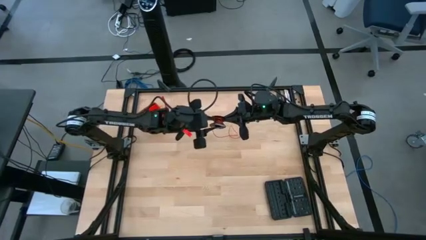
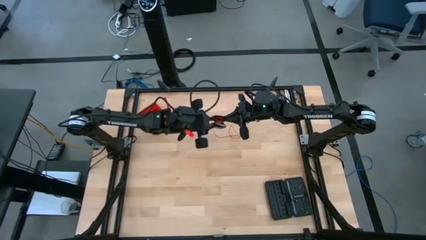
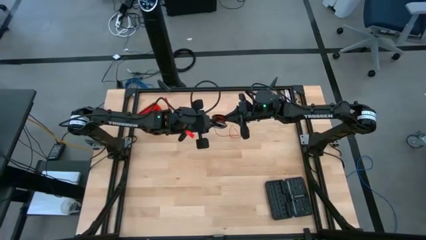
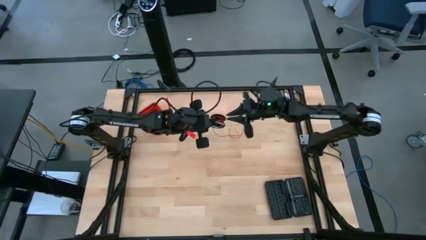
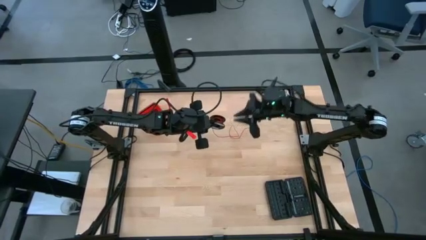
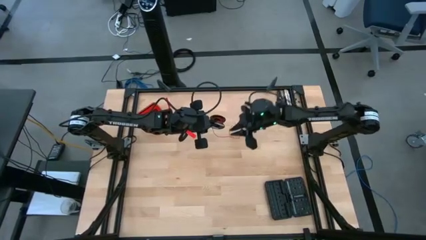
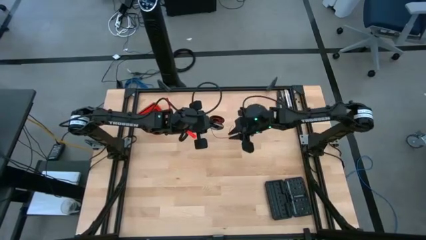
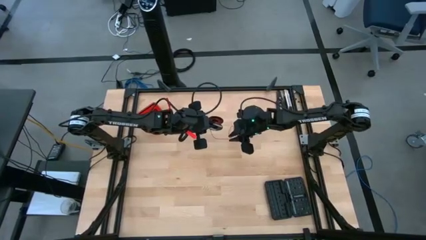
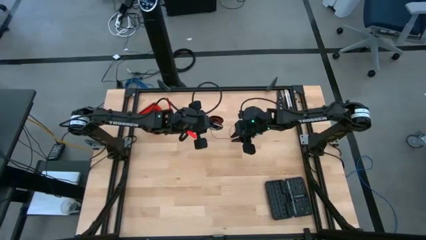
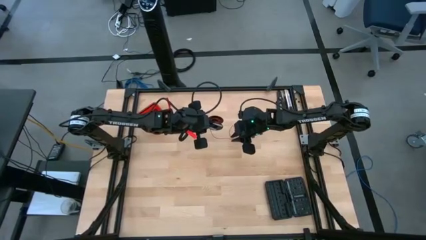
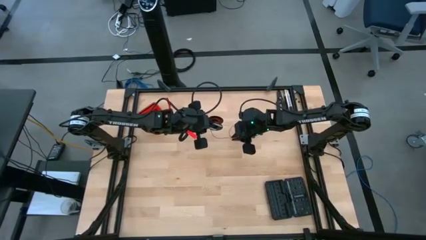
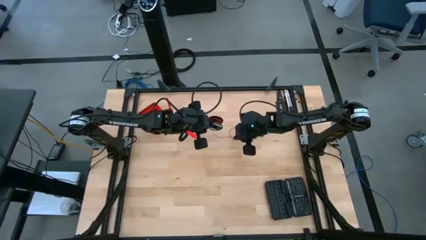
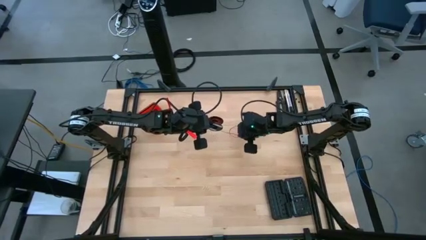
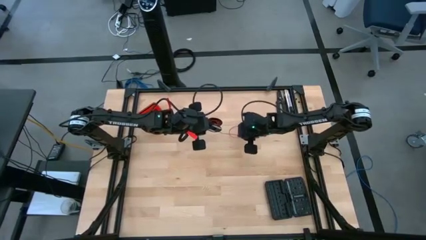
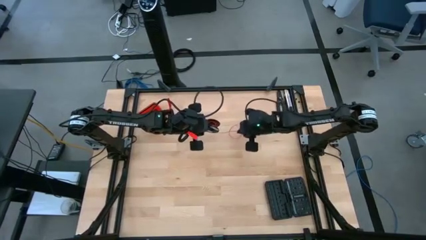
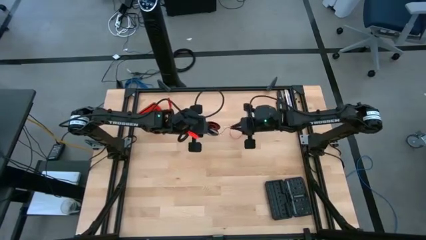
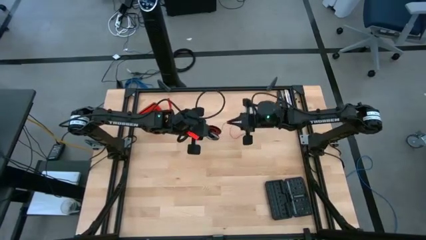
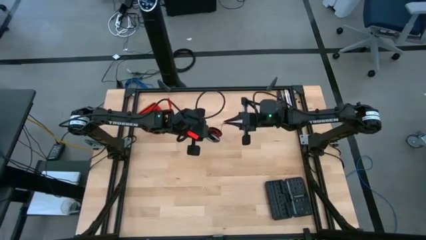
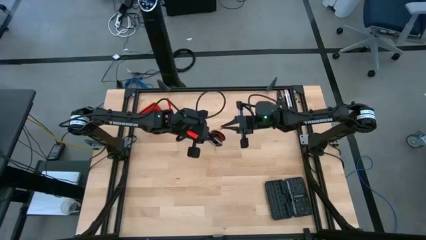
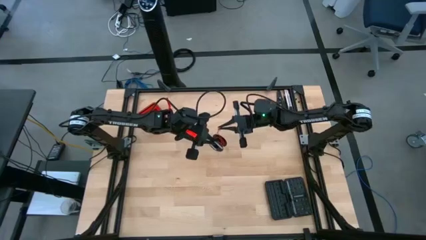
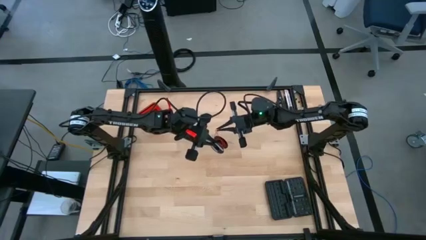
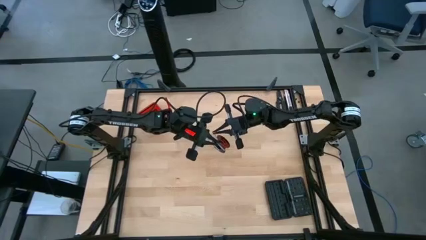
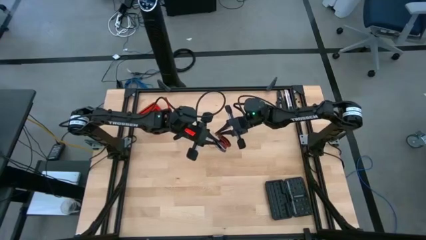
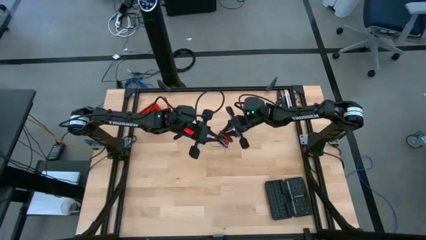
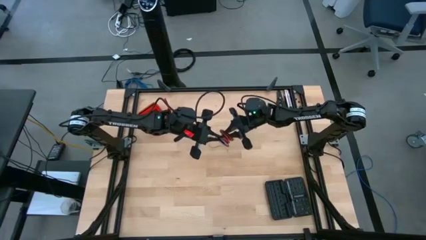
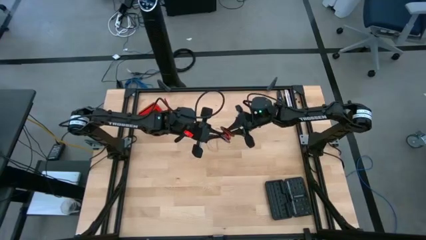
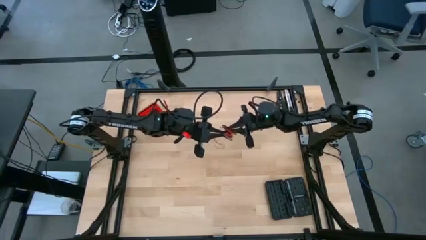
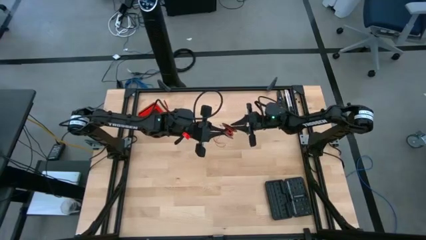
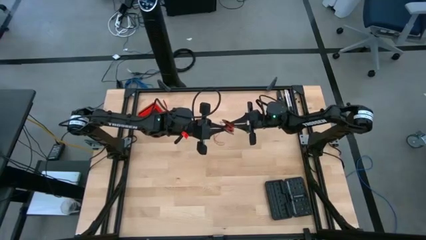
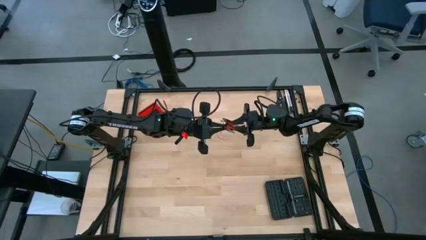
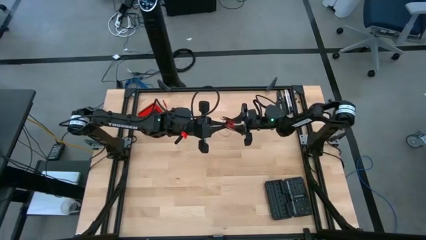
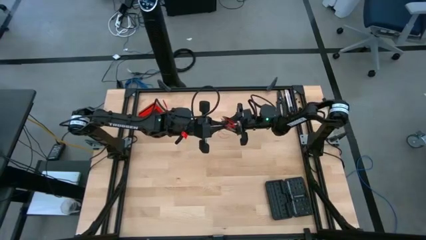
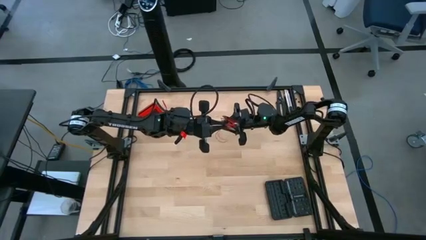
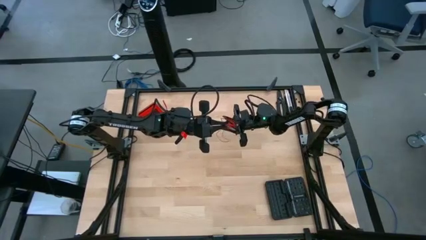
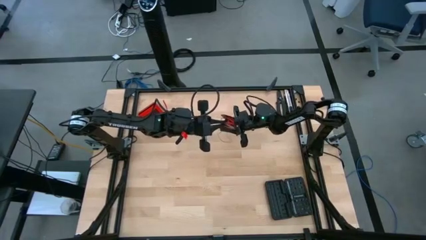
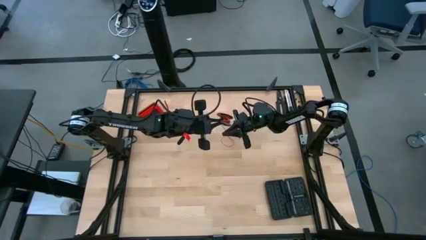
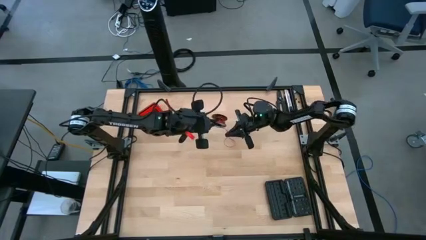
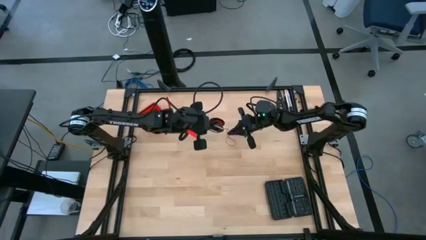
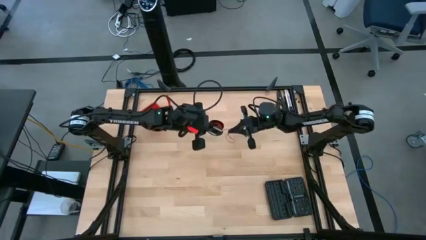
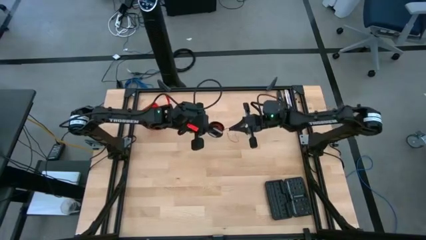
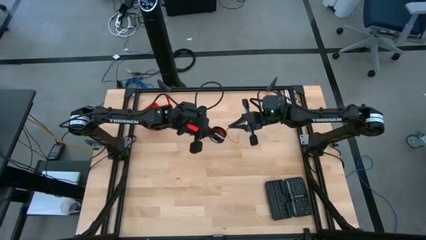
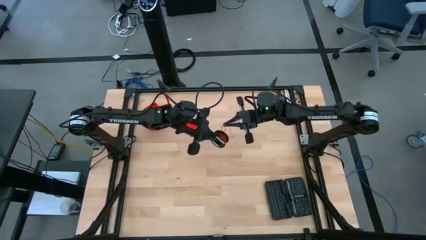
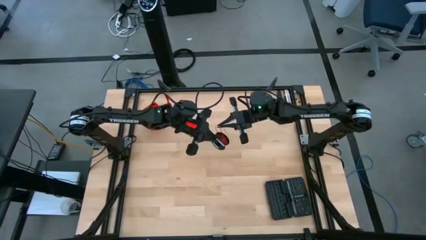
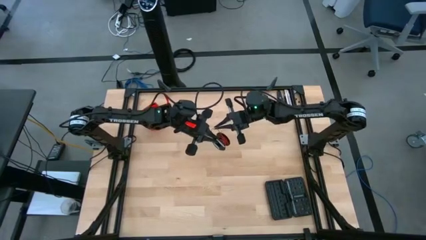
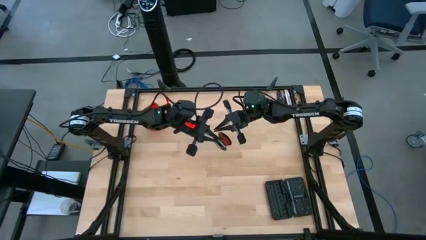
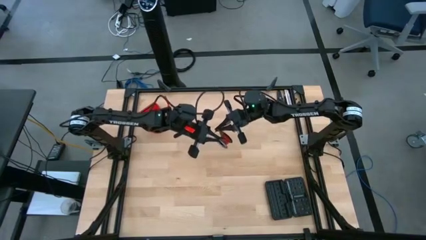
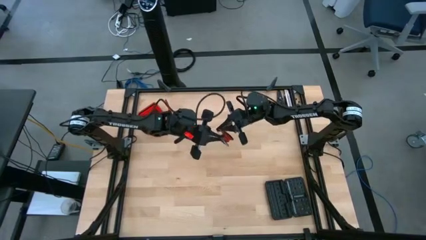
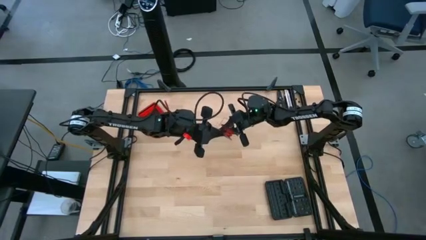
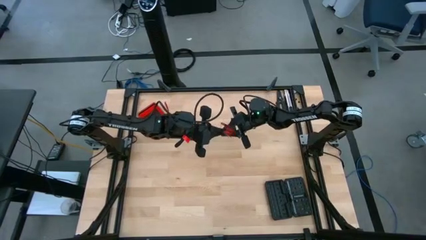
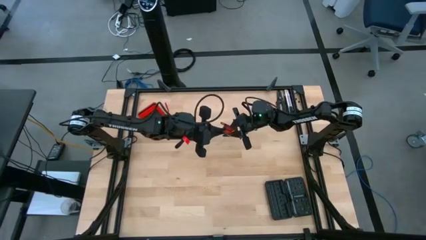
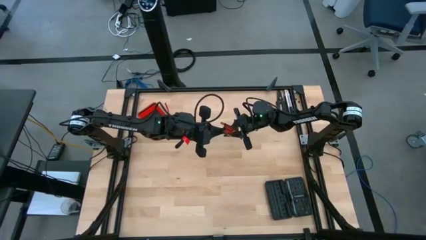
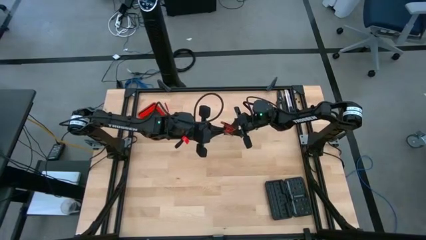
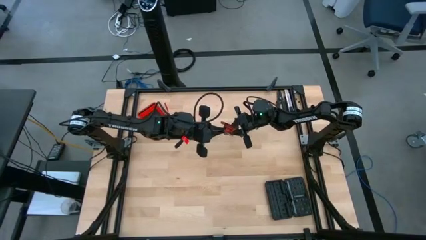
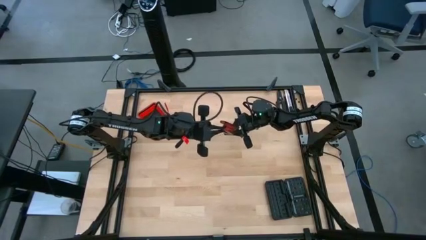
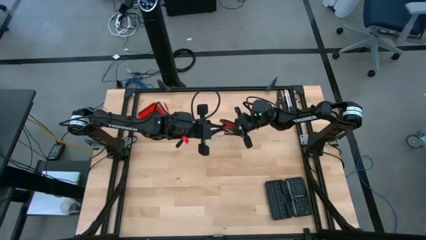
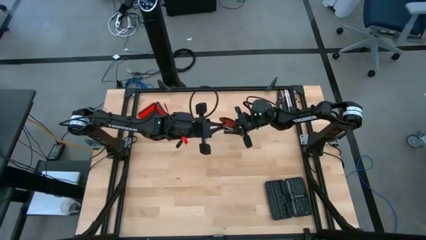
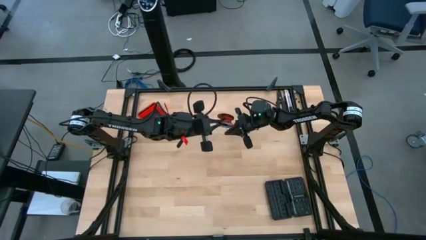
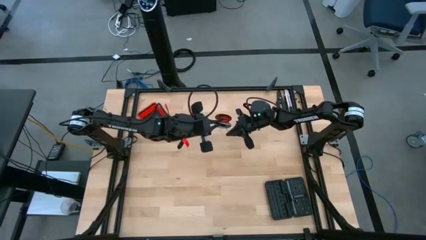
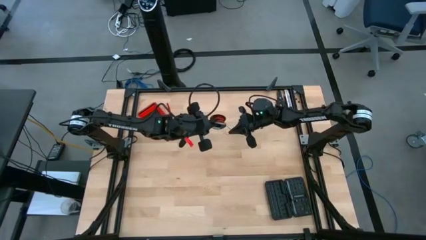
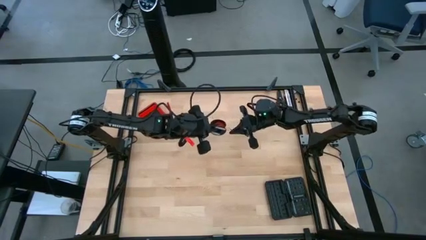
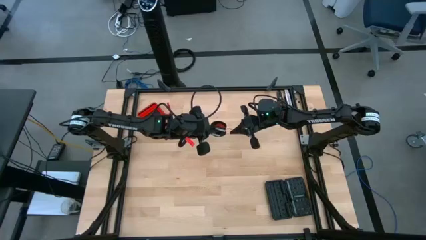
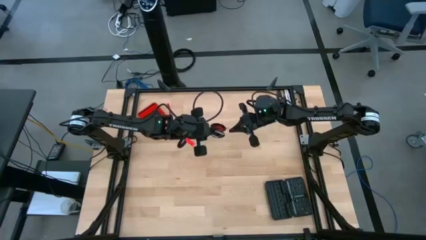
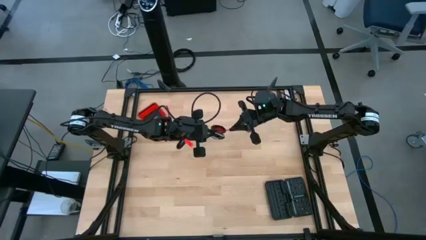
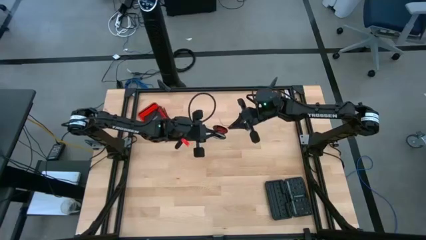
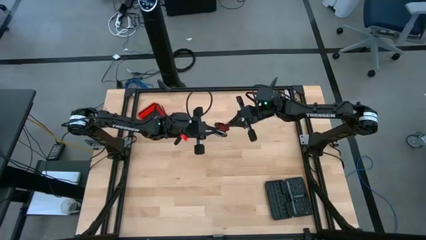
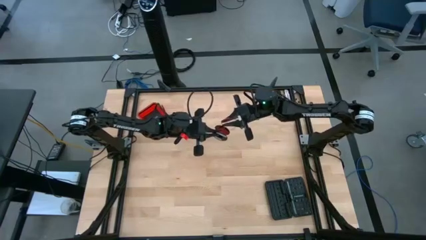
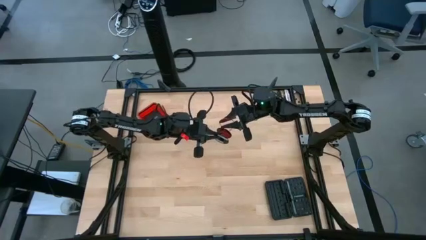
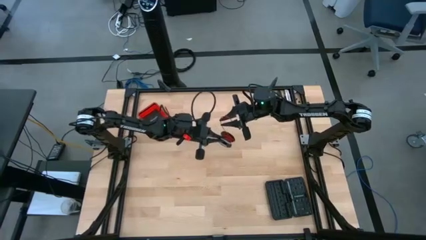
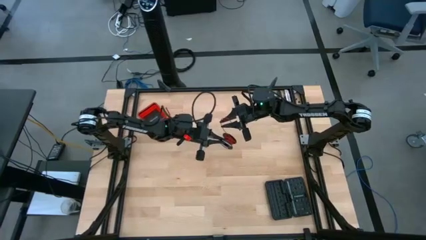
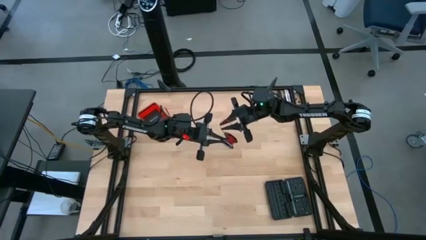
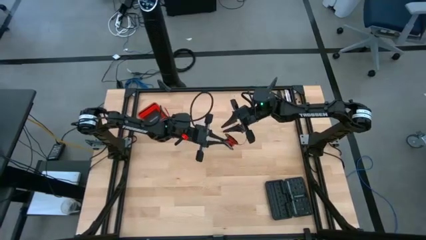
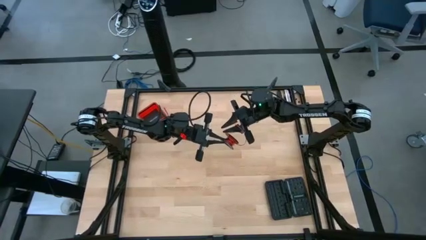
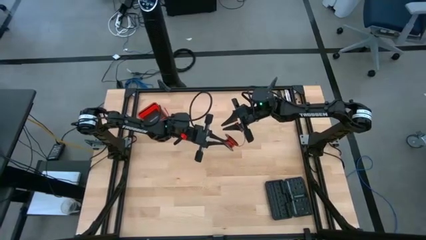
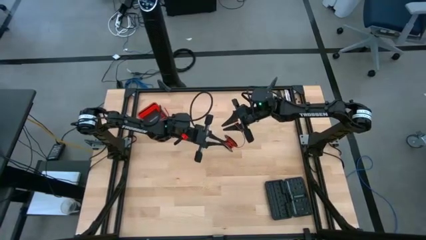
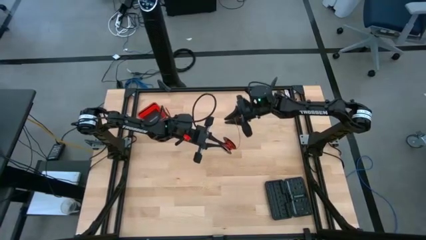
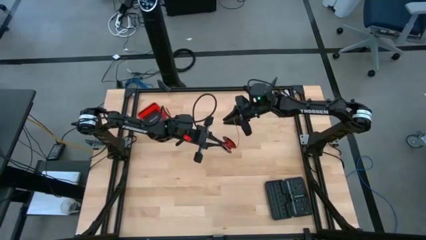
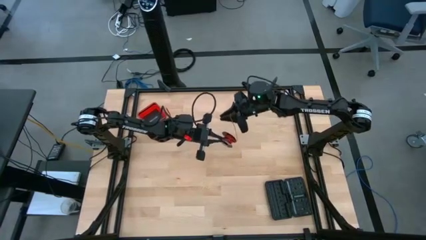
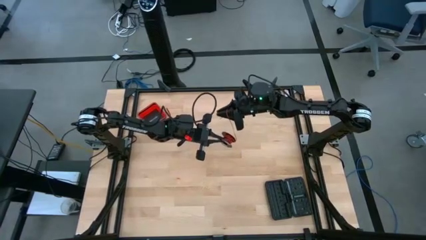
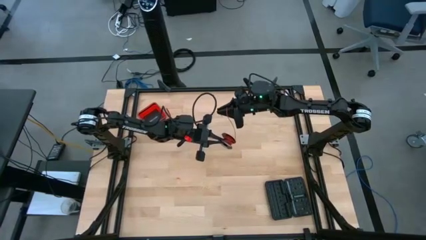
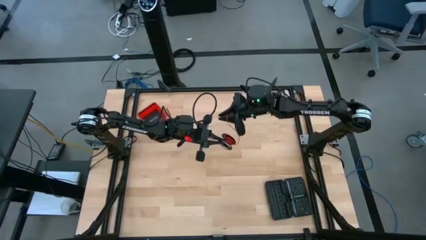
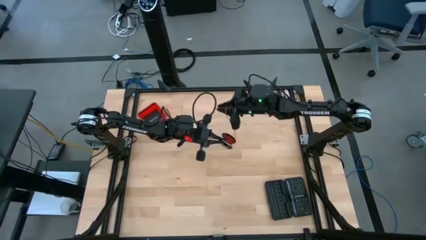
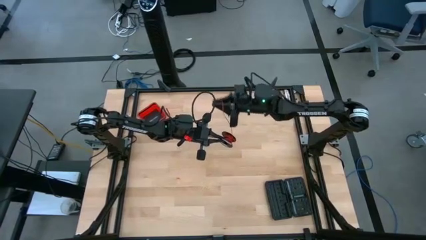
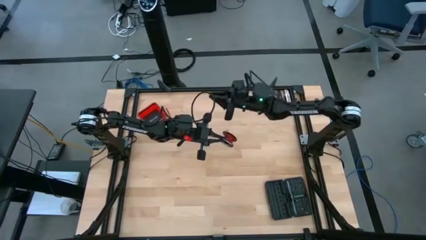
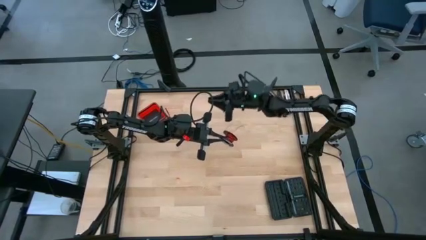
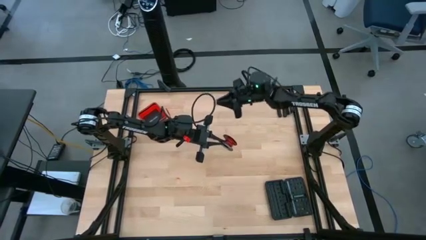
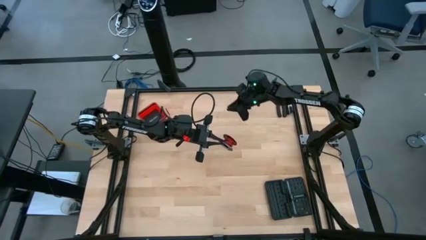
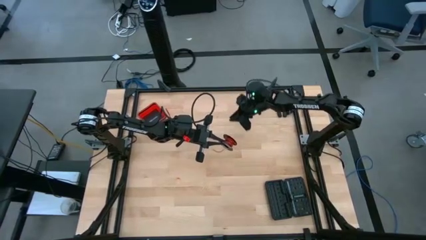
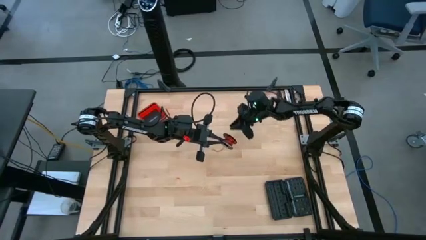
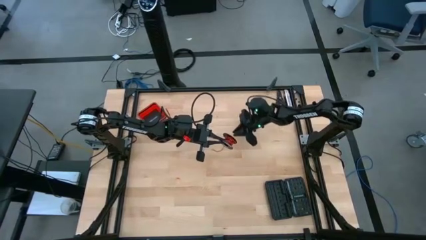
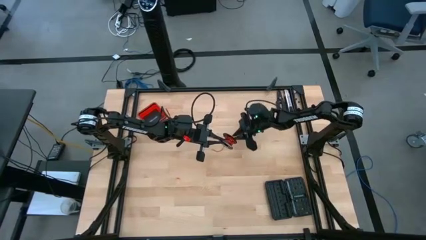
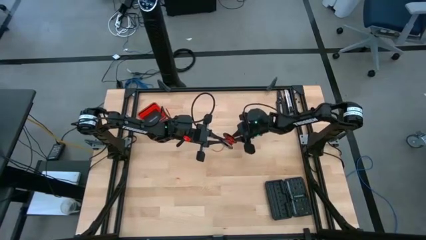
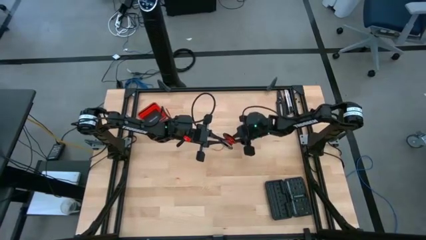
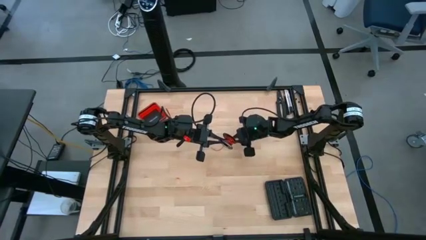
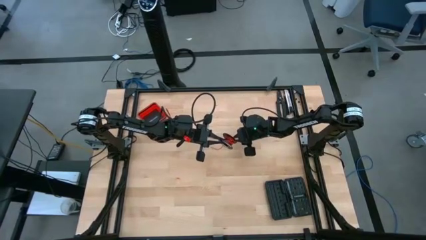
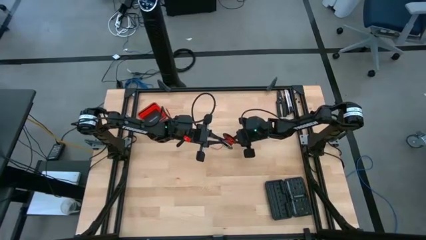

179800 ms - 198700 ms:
Task: Coil cords
Coil the wire to the spool
